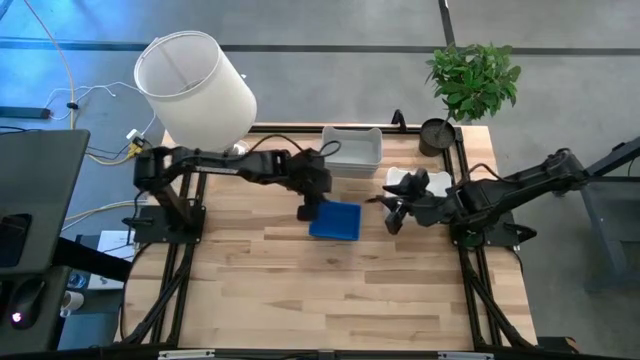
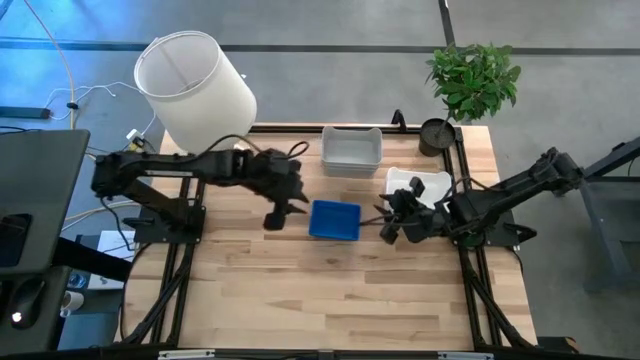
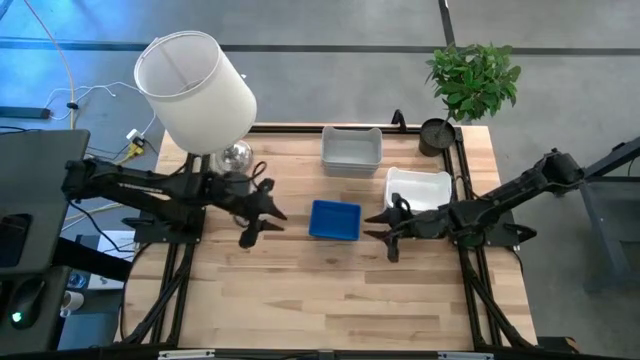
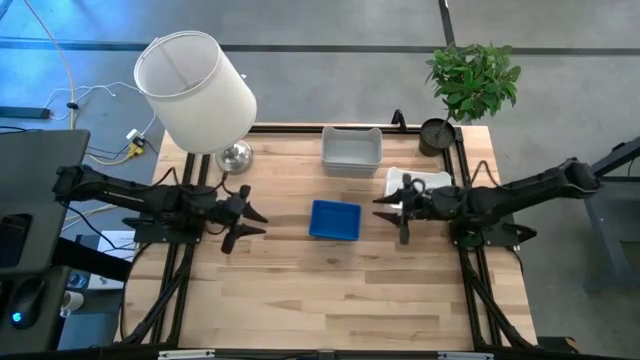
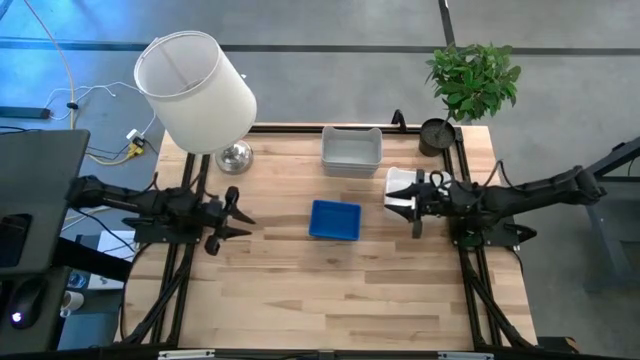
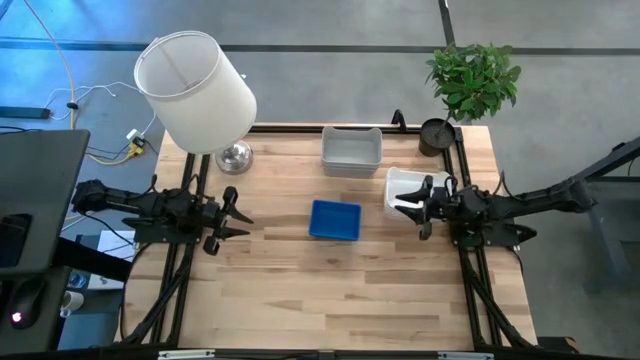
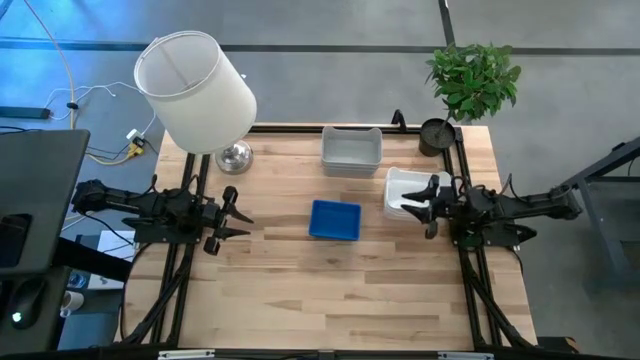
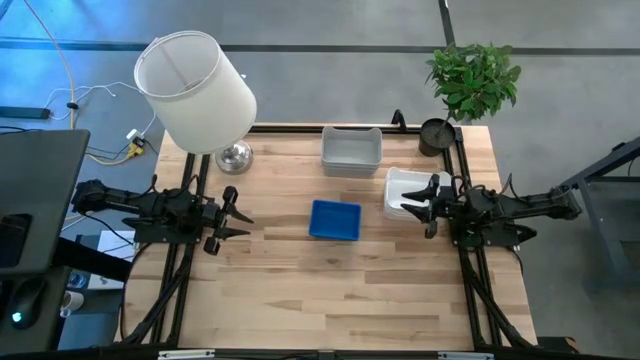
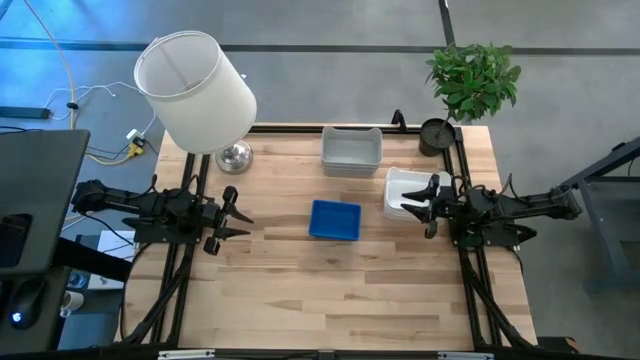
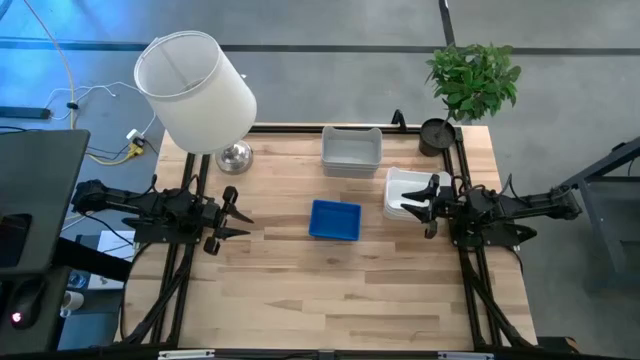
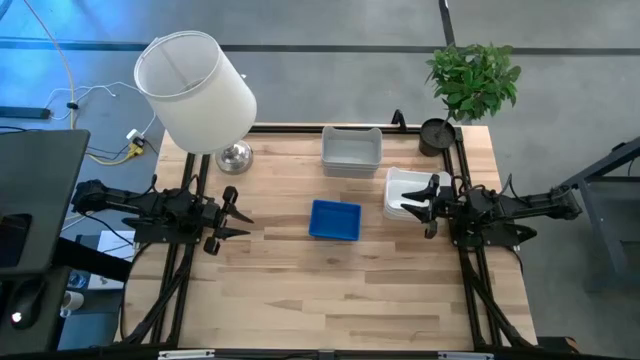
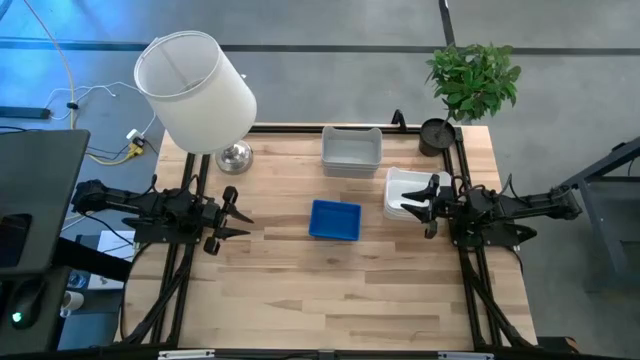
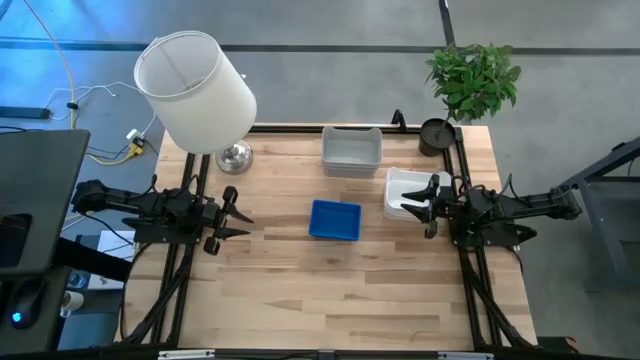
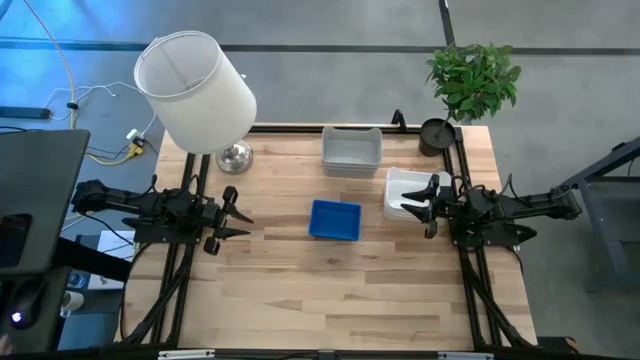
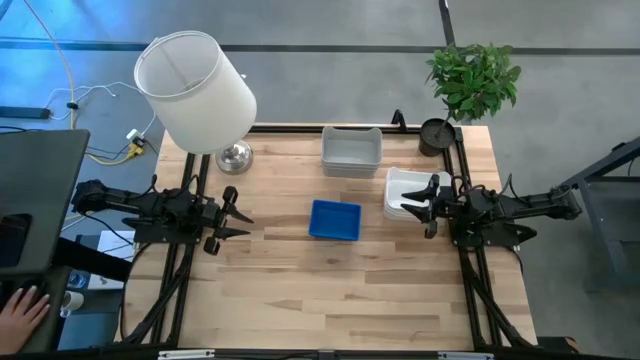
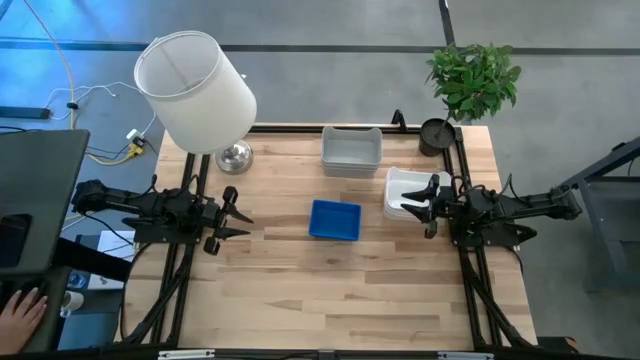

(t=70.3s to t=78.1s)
Return to Home Position
